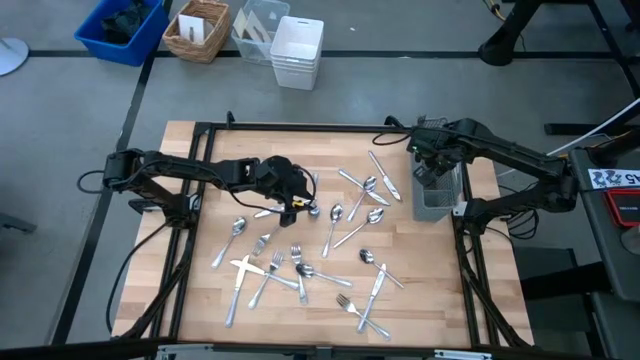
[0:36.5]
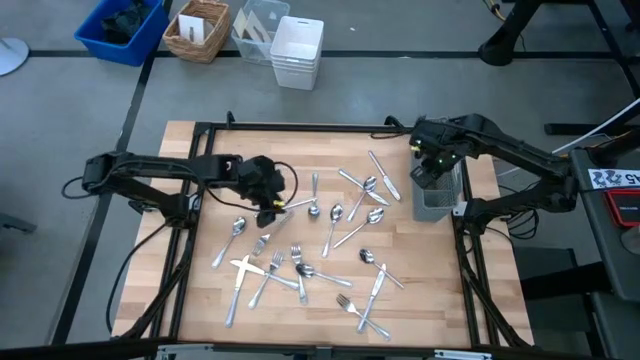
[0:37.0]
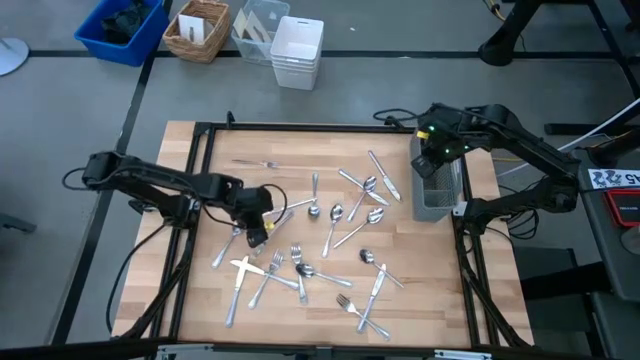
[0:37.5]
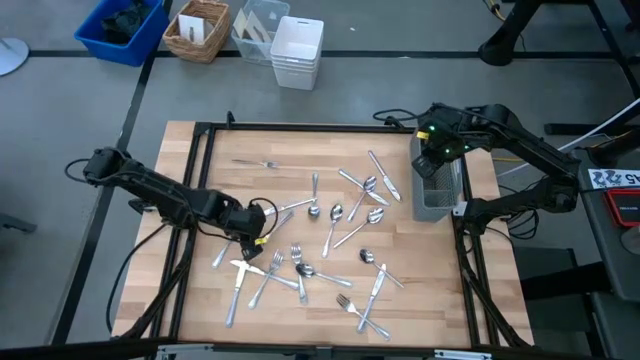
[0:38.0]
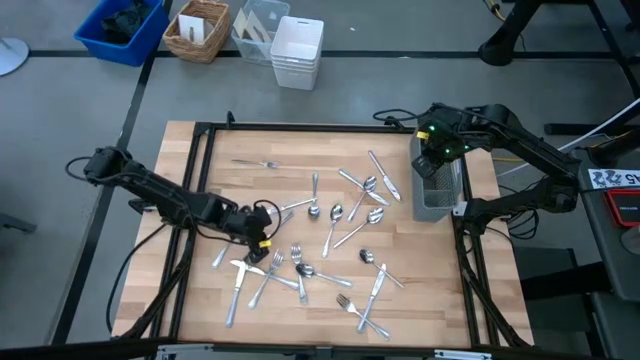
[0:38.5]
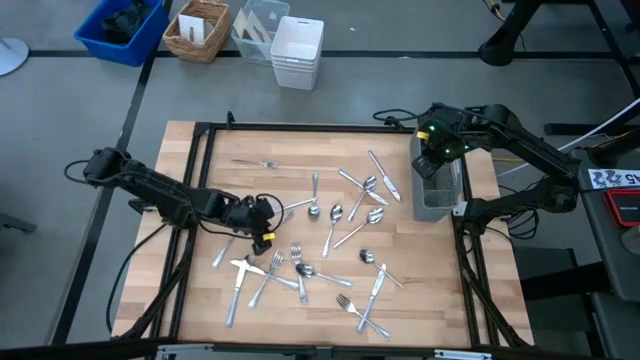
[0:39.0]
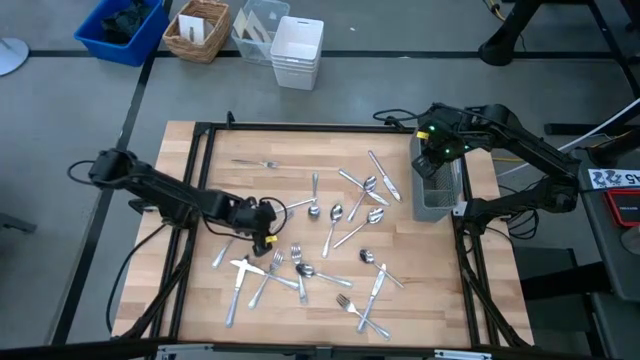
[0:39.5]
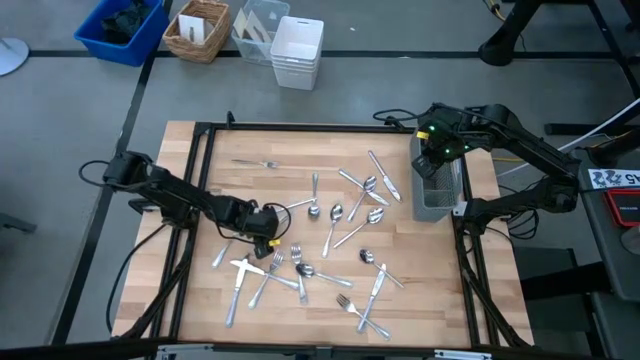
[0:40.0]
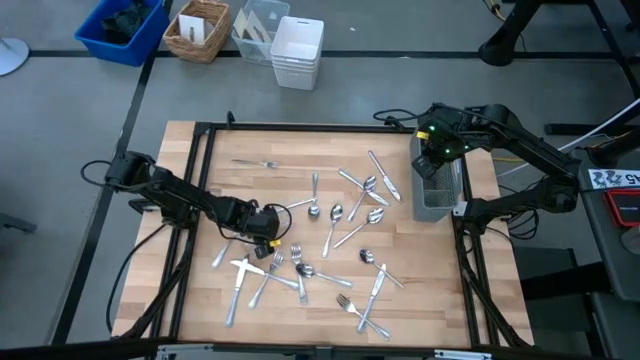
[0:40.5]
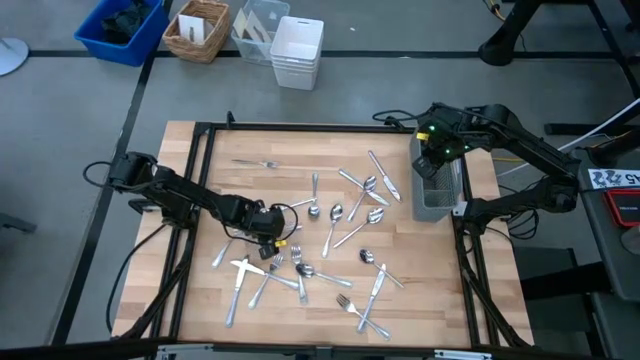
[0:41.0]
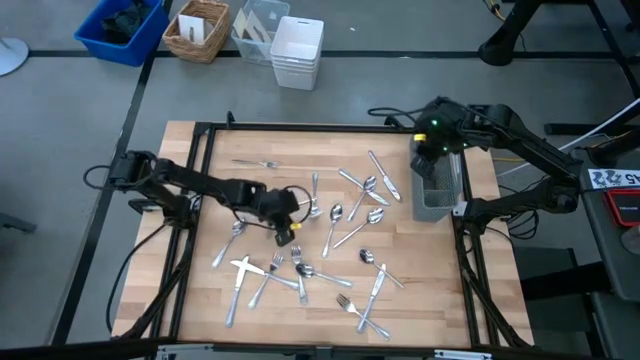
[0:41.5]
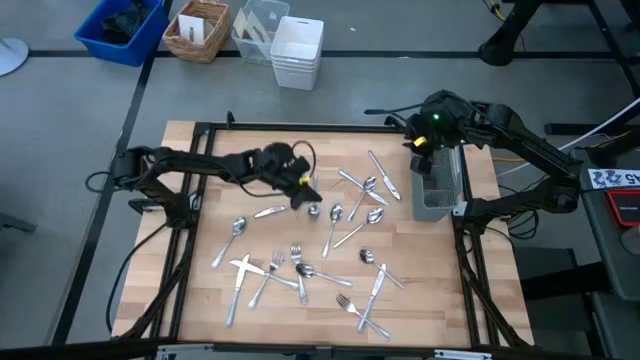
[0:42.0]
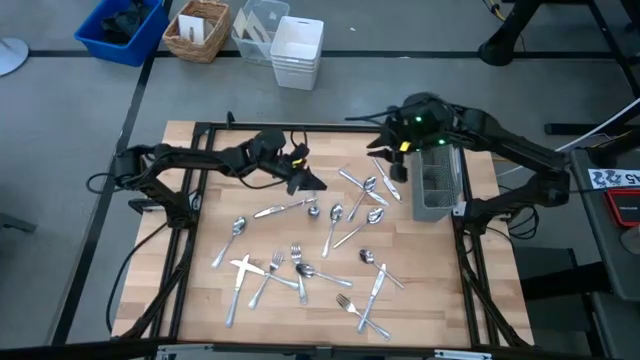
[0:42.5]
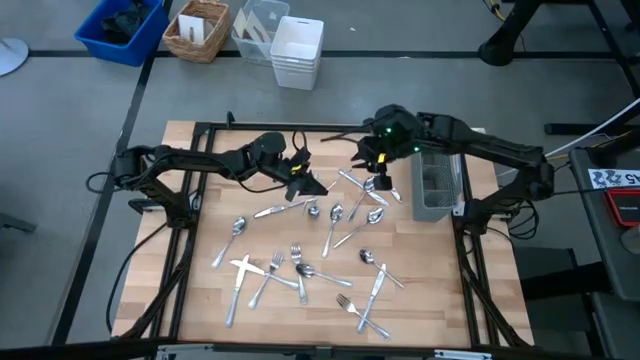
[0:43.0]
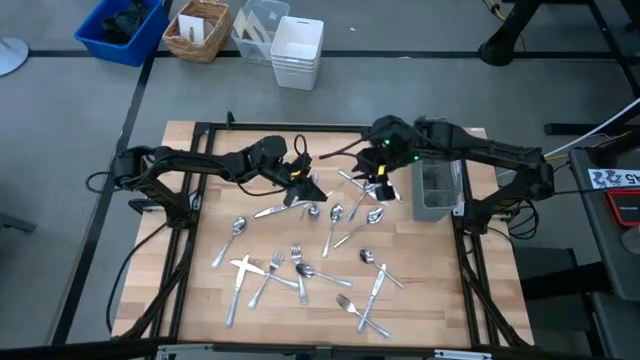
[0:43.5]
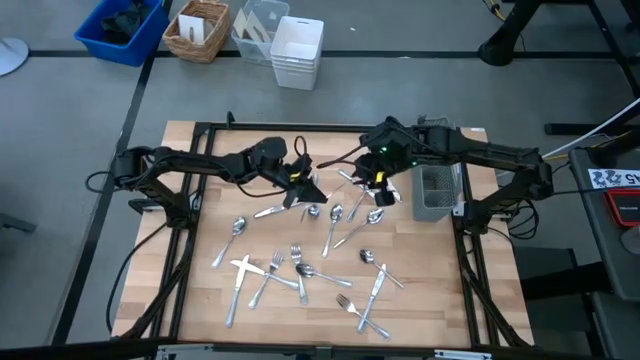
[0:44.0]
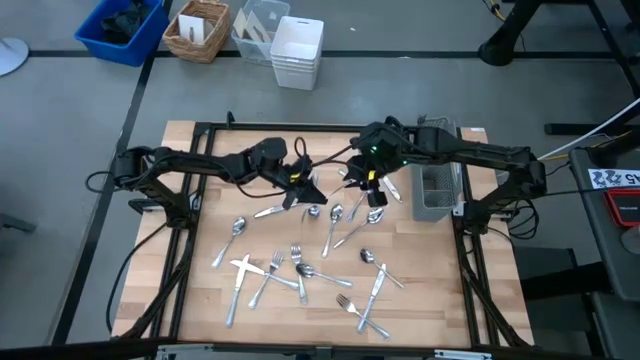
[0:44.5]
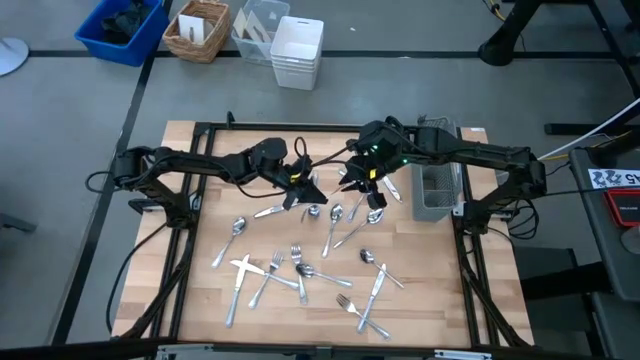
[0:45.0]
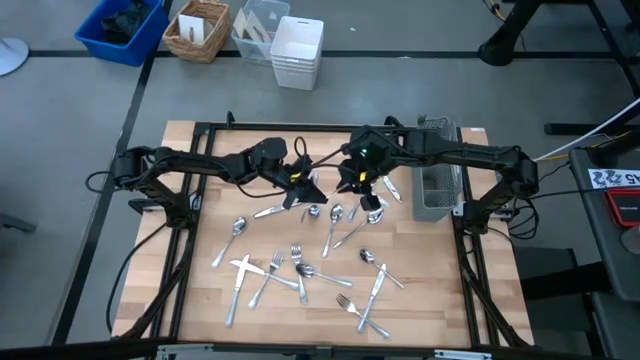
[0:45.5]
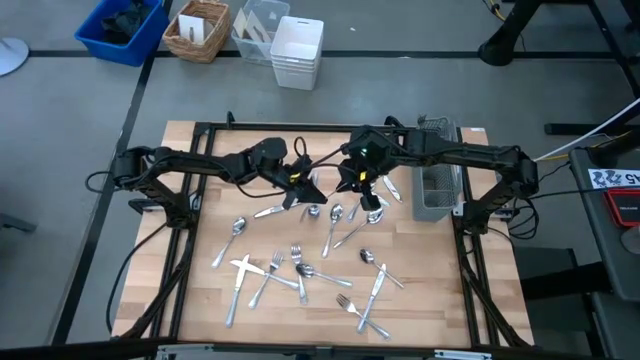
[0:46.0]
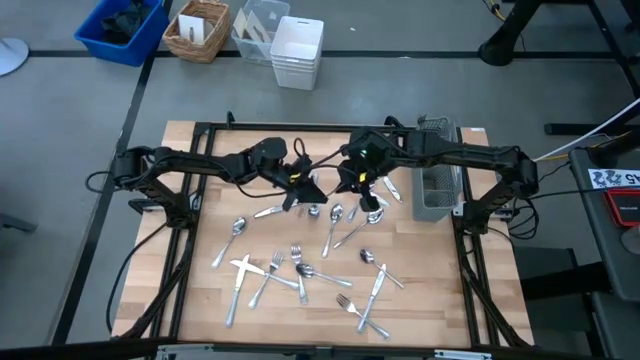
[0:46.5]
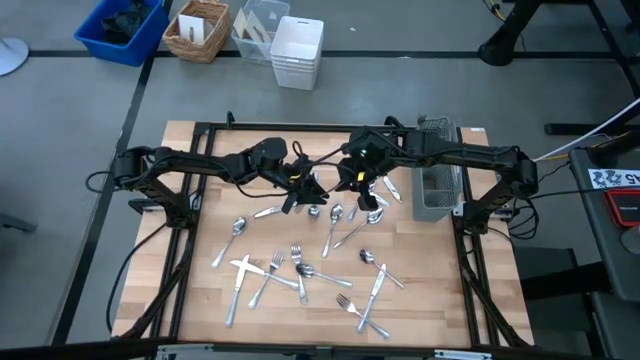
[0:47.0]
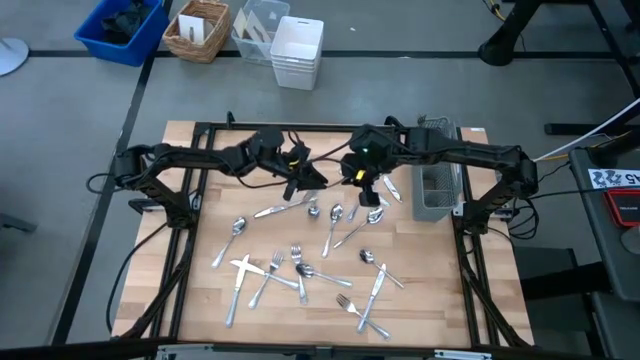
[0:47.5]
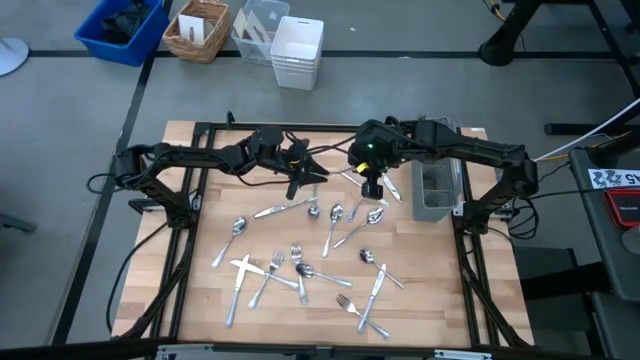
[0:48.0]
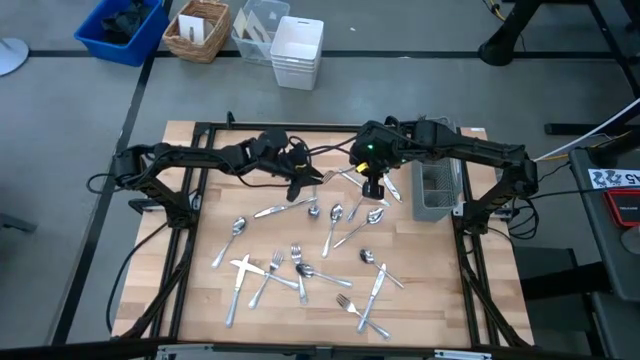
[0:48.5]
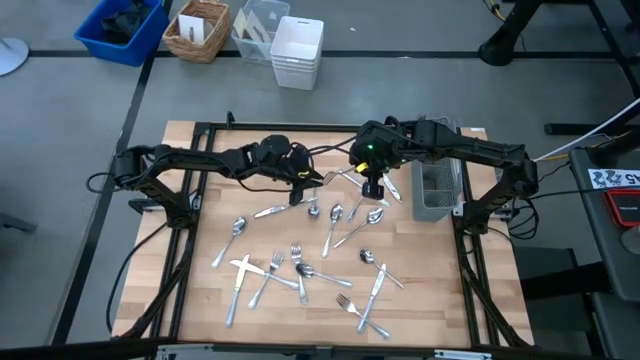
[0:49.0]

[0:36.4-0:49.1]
Task: Sort silverware
Put the fork into the left section of the utensil holder

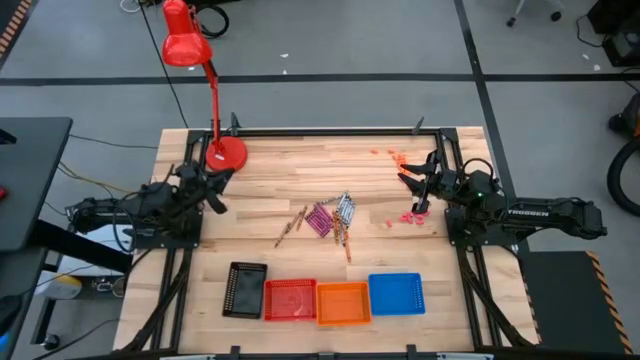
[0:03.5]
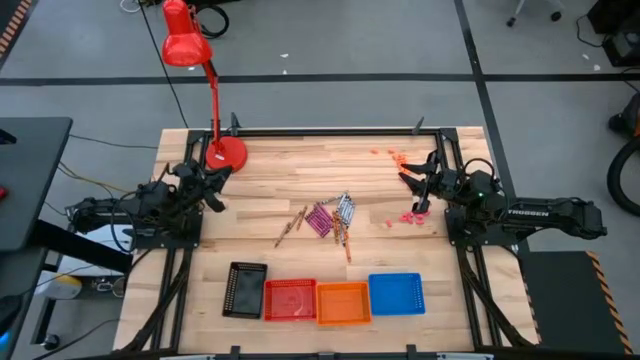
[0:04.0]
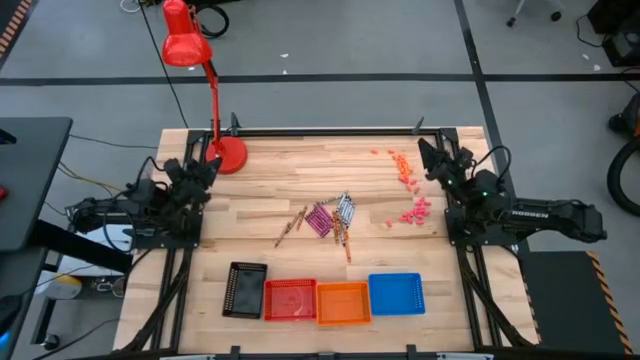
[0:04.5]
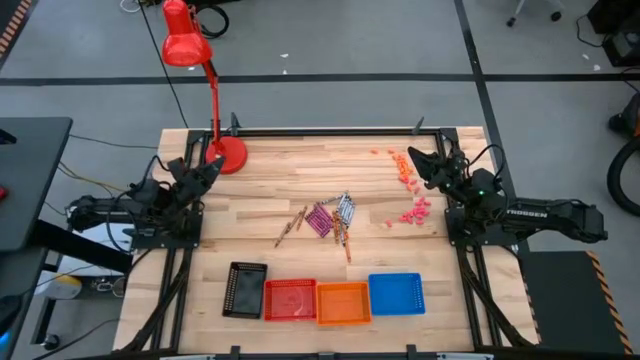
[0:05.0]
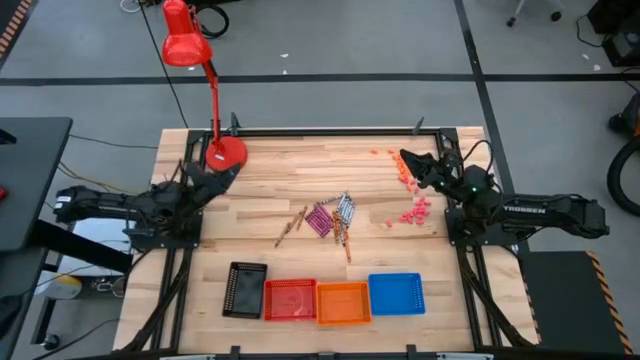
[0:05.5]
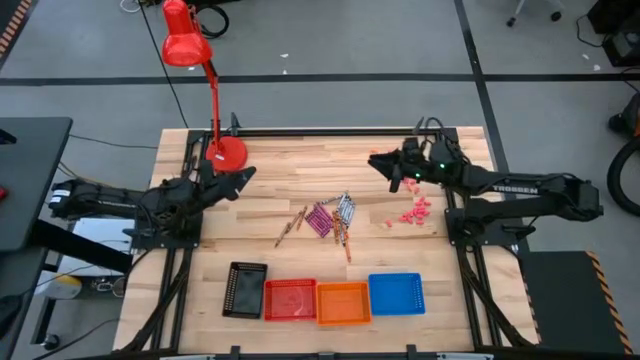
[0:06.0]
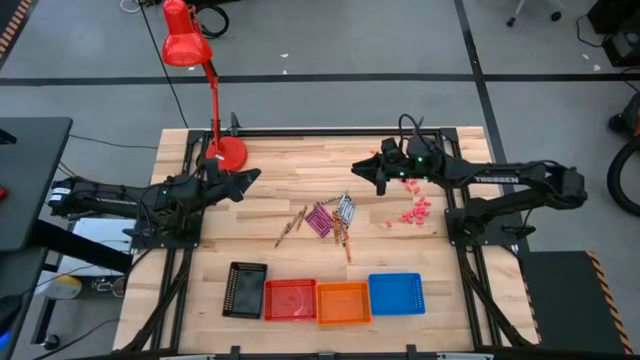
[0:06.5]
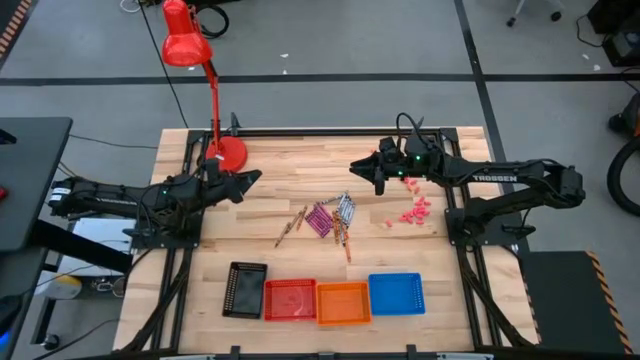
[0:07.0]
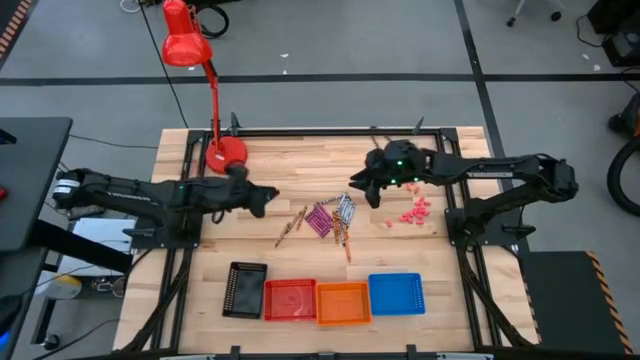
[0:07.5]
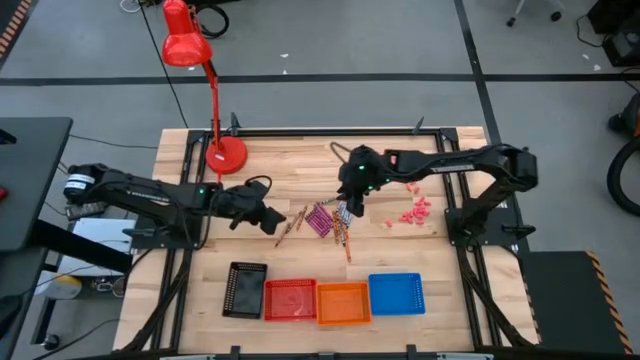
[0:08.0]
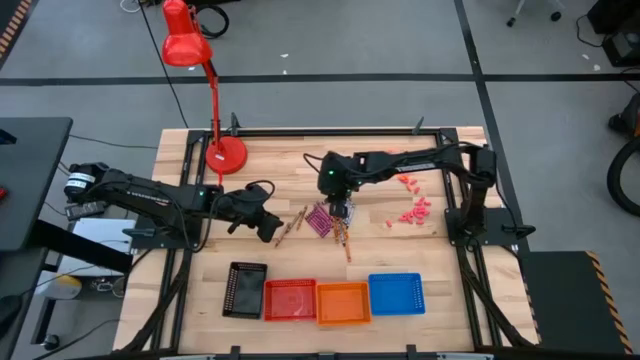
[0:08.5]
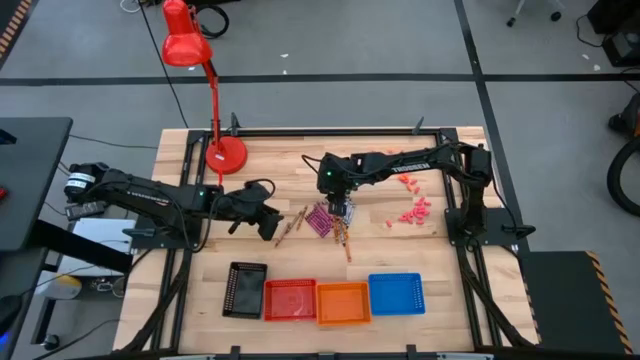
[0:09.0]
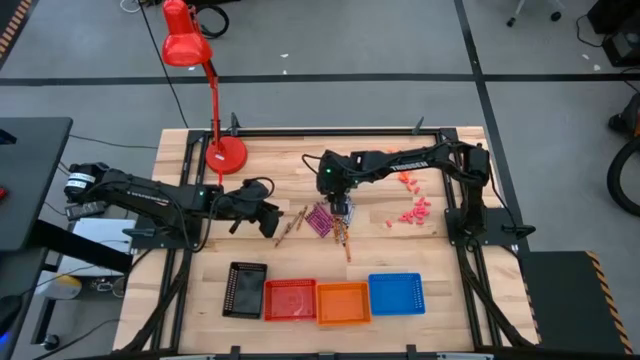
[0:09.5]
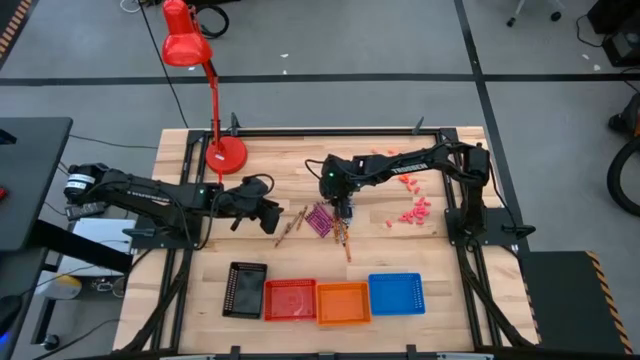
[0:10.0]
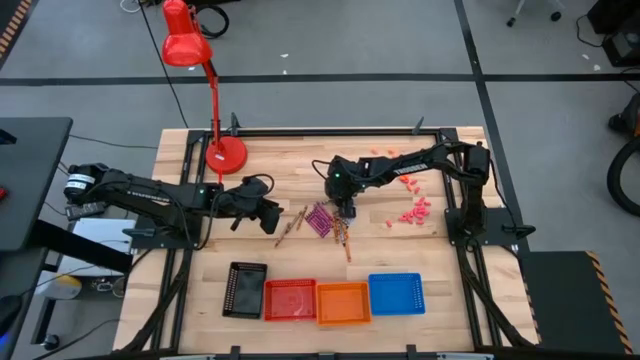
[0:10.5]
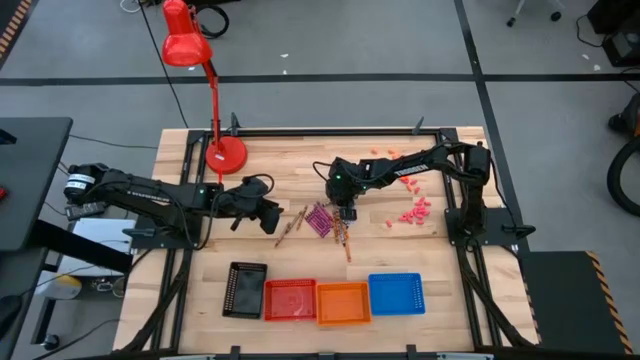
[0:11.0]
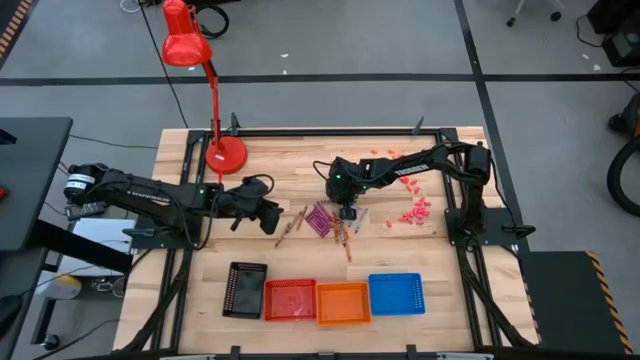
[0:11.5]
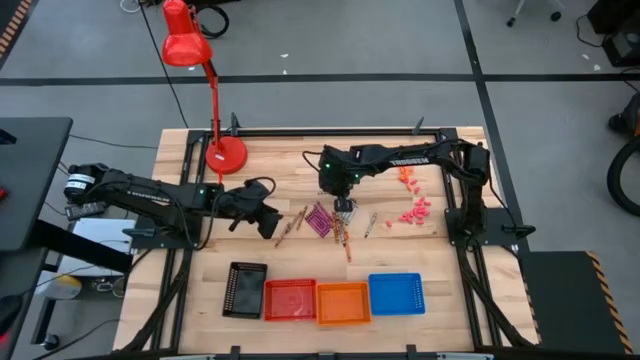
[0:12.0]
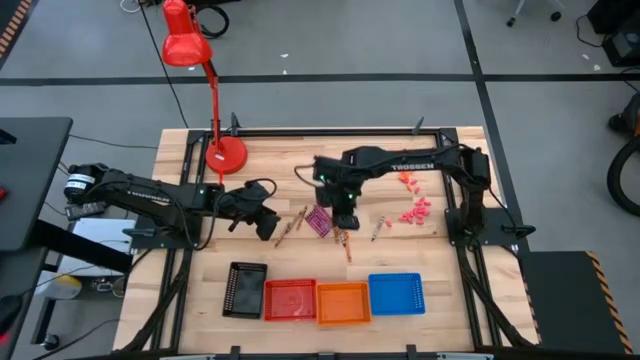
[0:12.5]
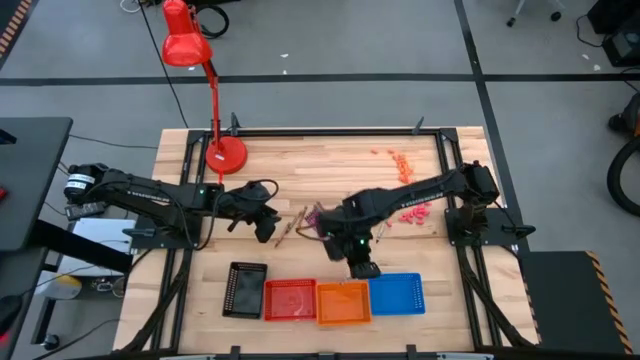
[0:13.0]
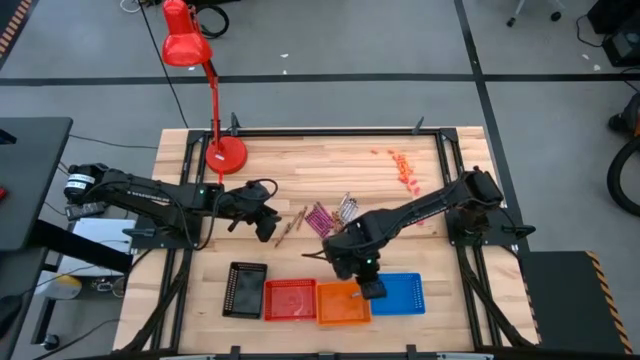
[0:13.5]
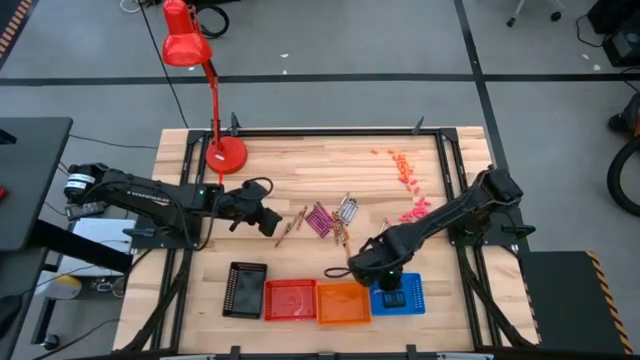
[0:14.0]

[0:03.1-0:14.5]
Task: Sort crayons
Put the black crayon into the blue bin
